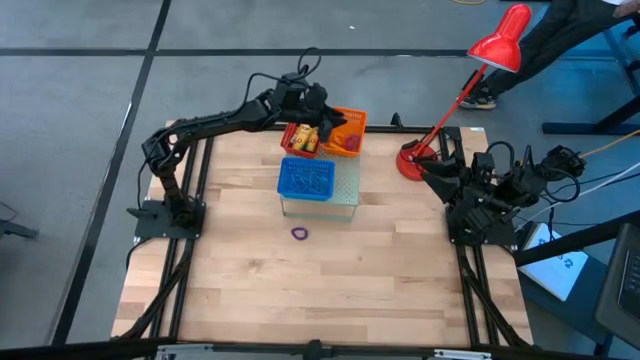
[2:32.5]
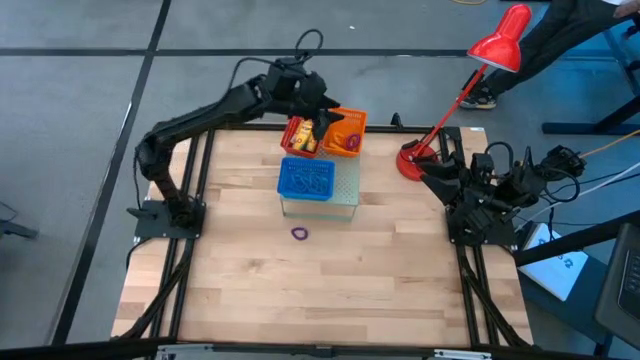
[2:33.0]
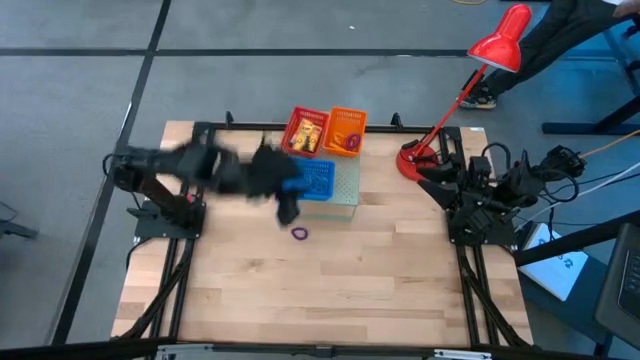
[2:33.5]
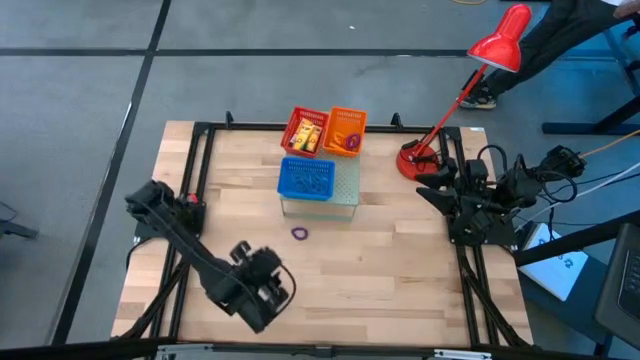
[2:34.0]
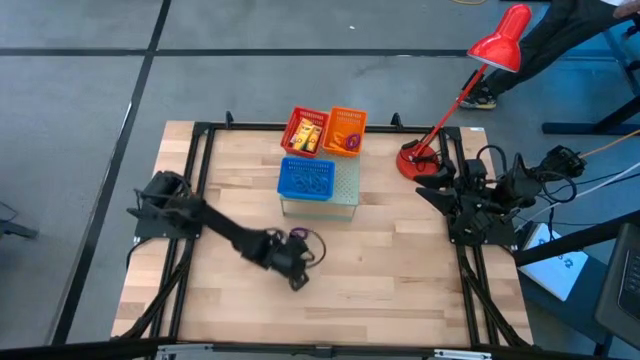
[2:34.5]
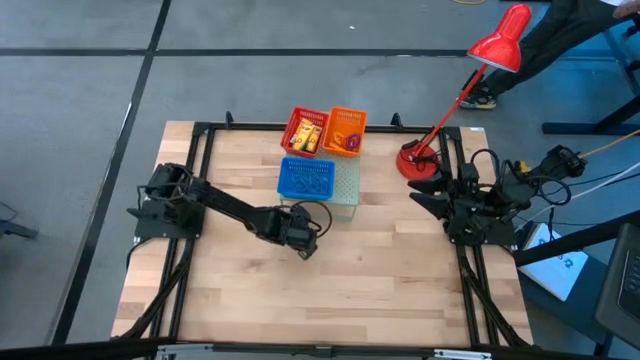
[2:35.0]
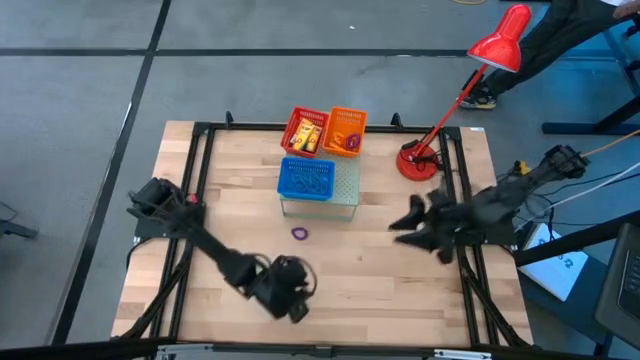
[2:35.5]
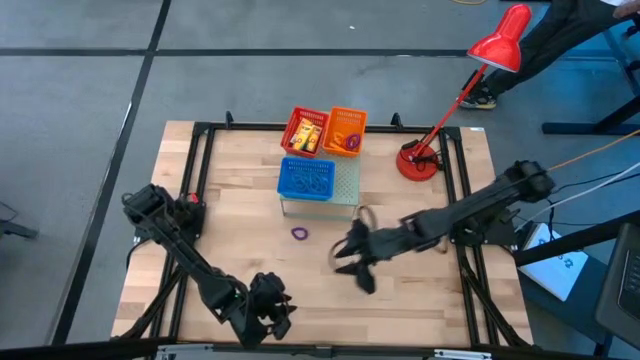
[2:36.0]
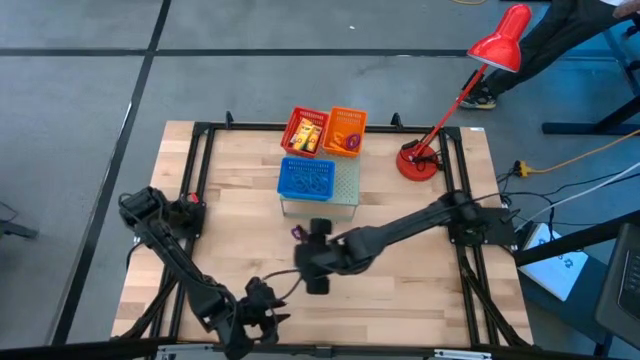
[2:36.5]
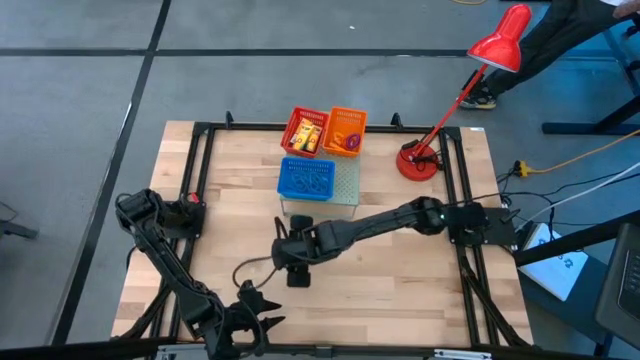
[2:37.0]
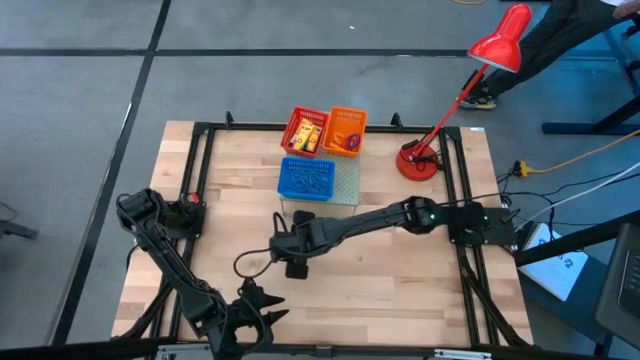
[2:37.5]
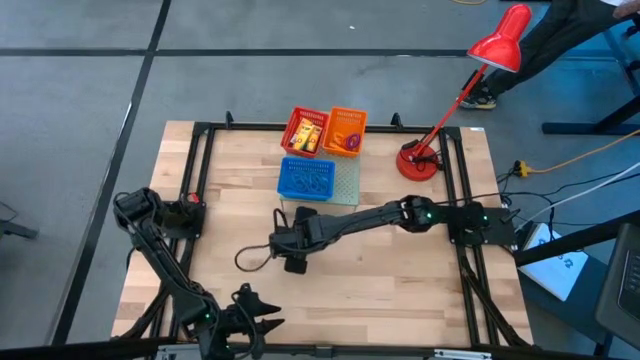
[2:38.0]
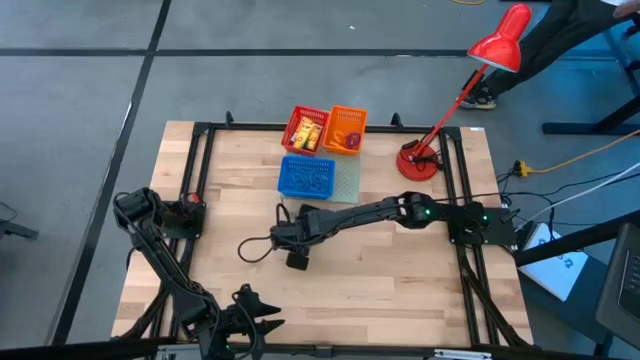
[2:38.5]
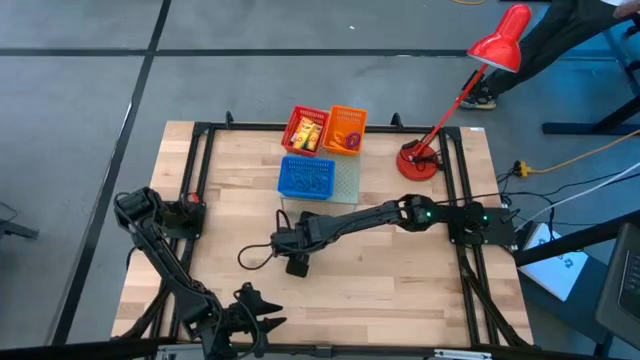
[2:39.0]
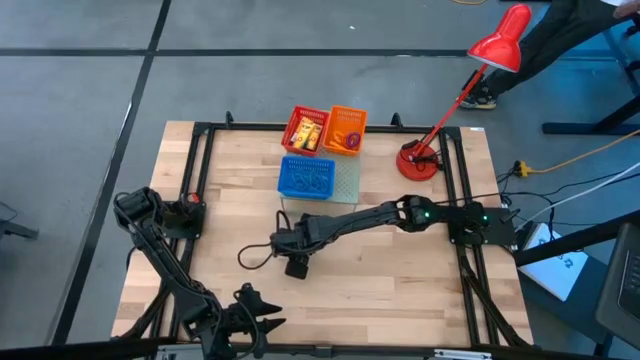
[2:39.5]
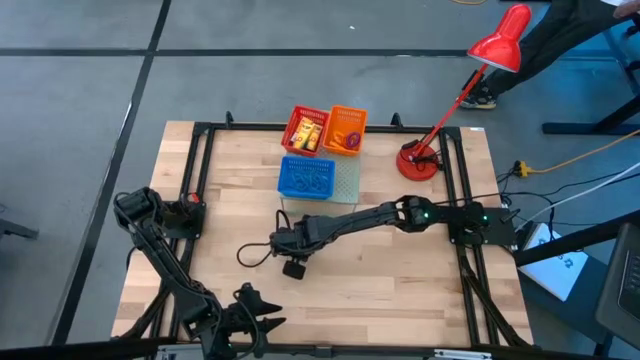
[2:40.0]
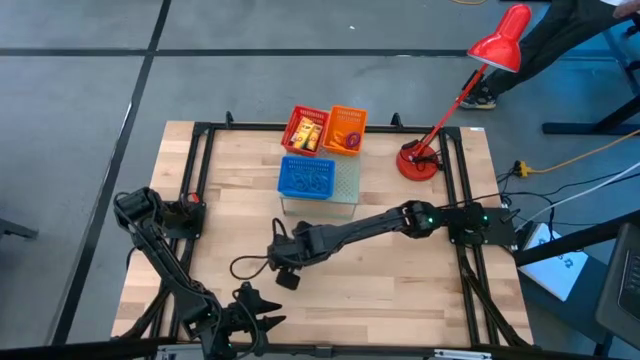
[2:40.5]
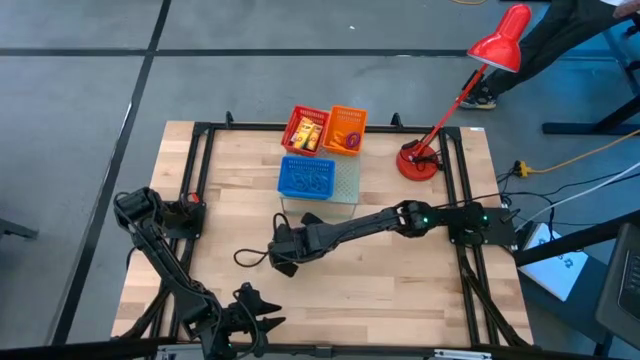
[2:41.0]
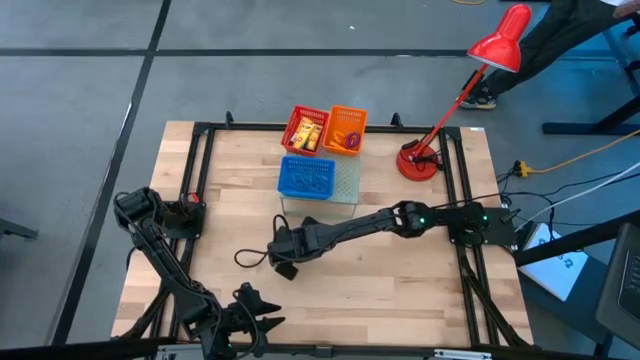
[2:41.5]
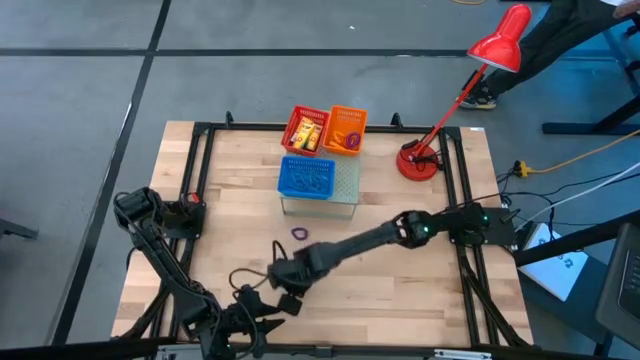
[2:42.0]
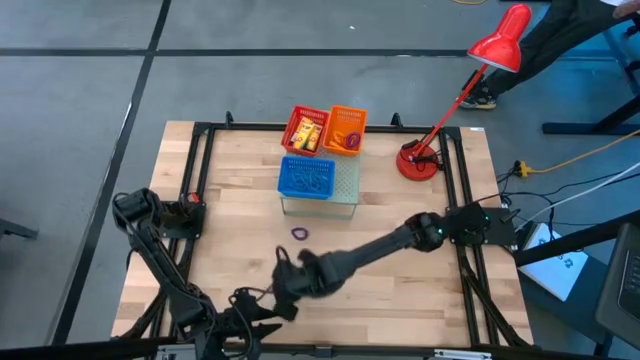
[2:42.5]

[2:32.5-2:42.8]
Task: Pick & Place Office Desk Supplies
Put the violet spring keychain into the orange basket on the shelf

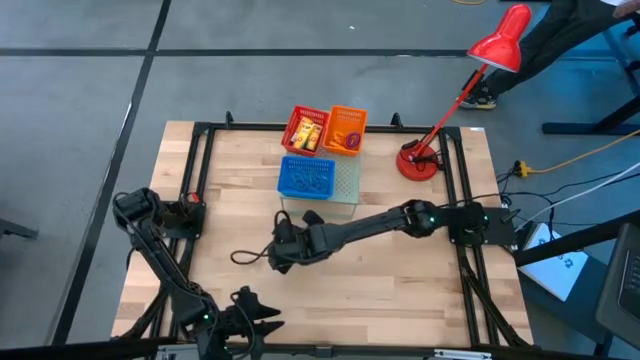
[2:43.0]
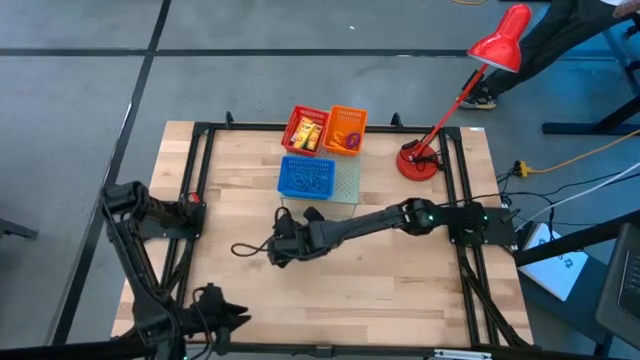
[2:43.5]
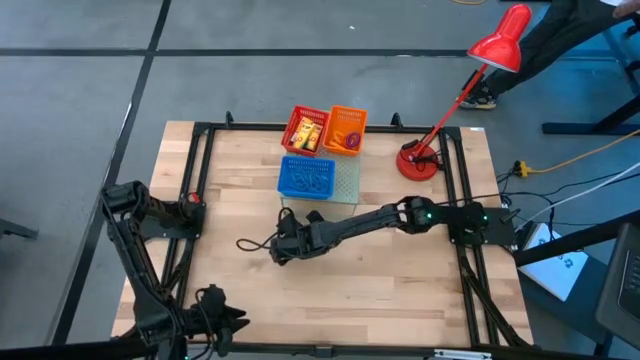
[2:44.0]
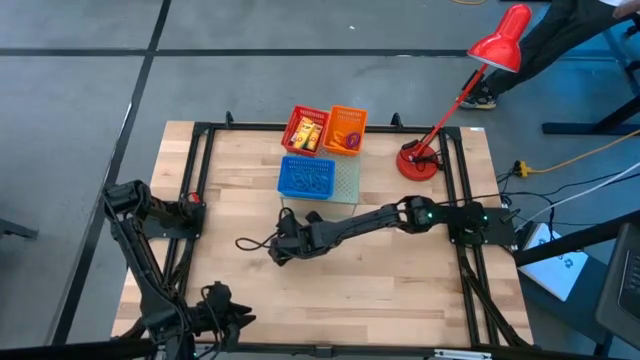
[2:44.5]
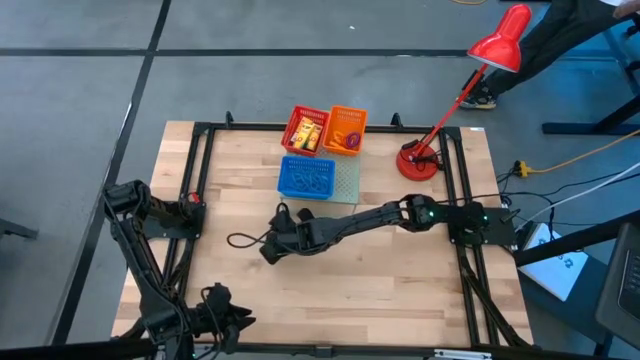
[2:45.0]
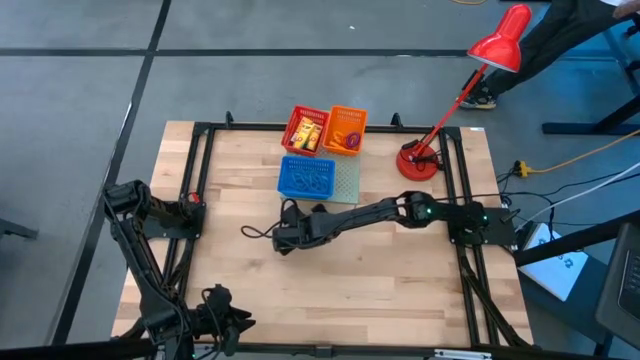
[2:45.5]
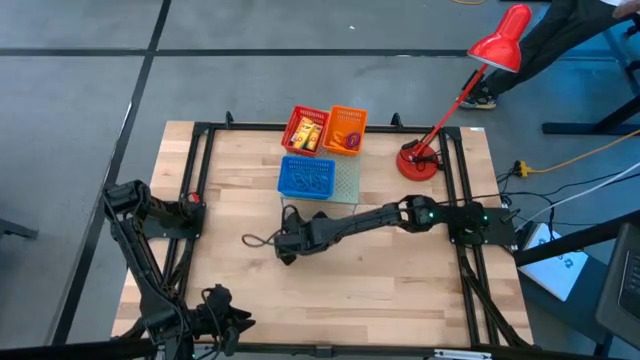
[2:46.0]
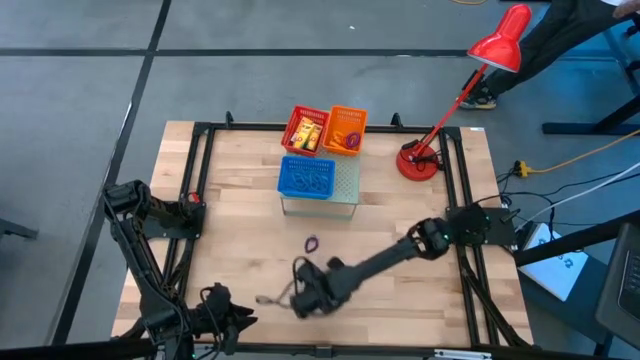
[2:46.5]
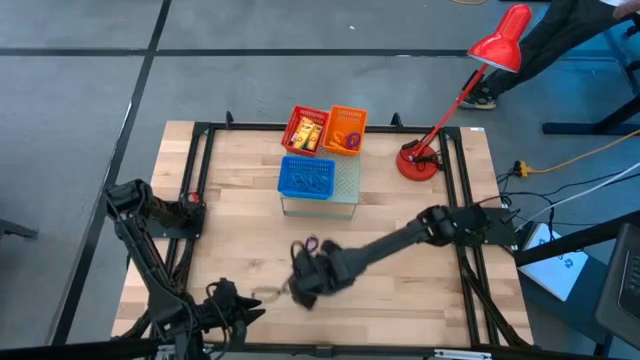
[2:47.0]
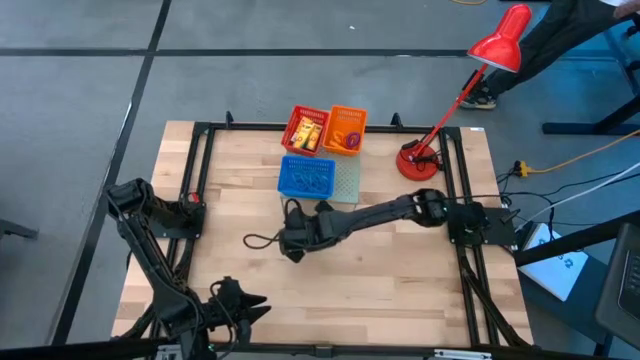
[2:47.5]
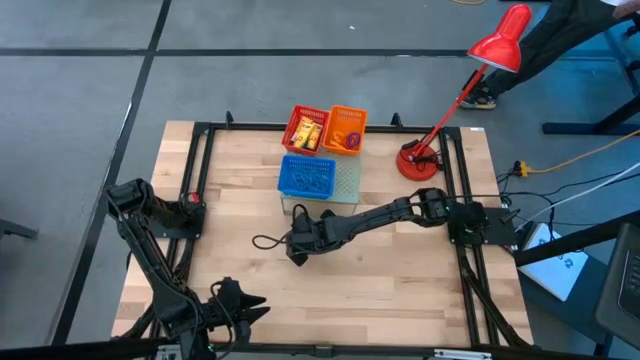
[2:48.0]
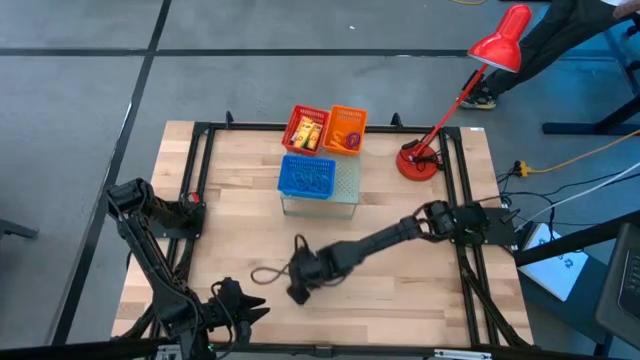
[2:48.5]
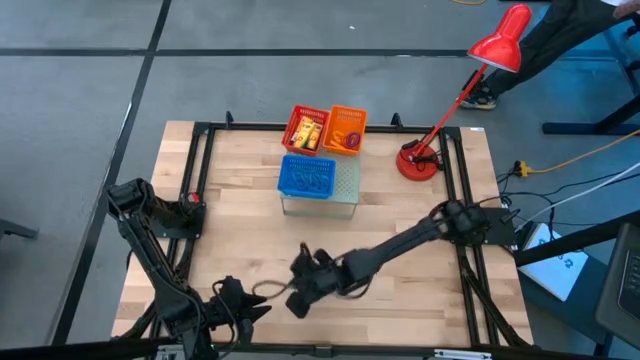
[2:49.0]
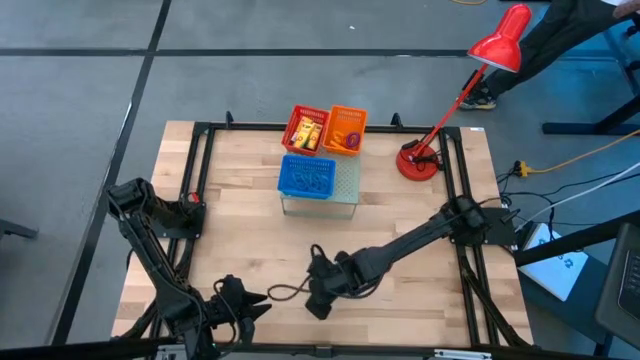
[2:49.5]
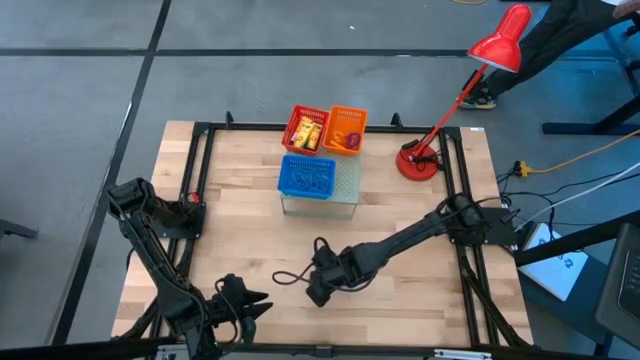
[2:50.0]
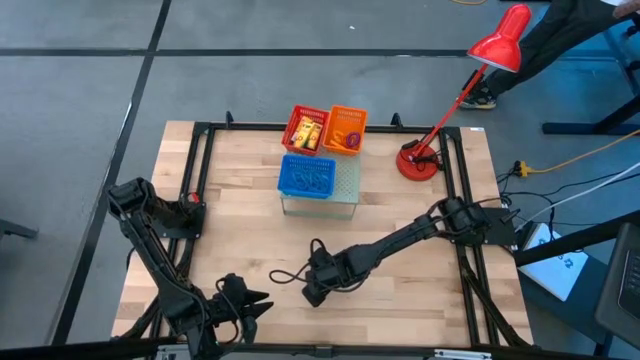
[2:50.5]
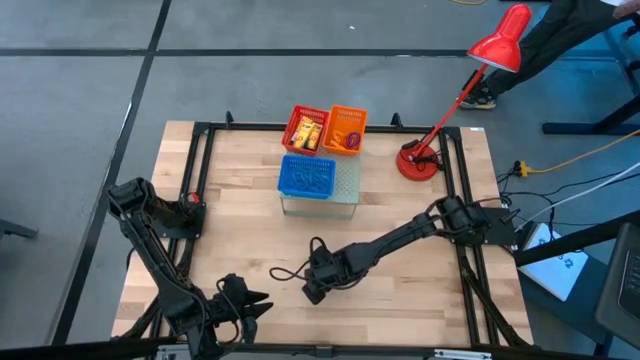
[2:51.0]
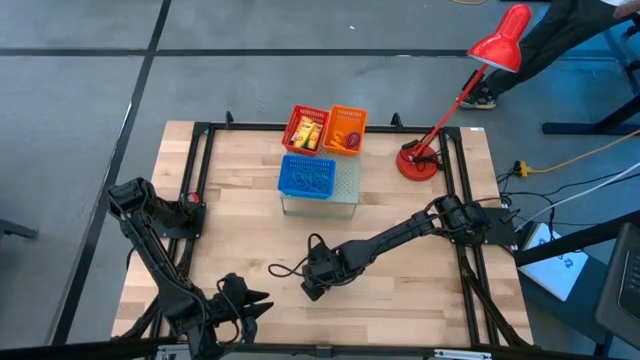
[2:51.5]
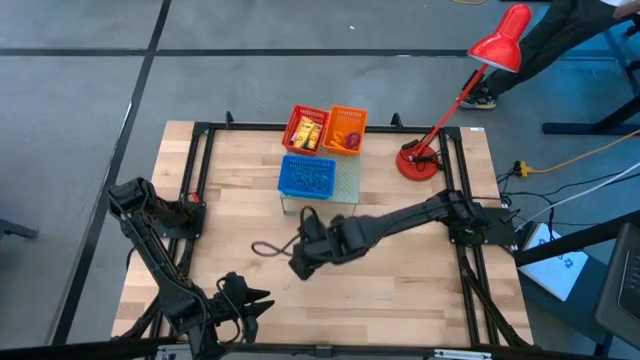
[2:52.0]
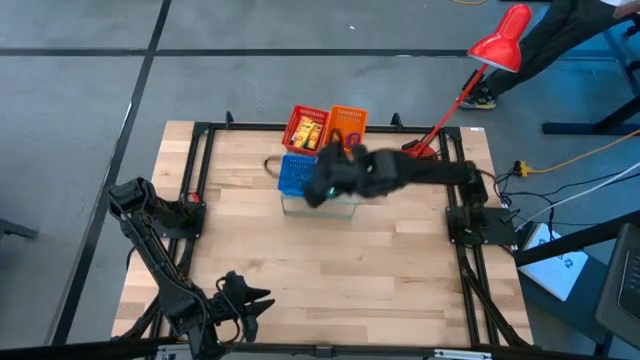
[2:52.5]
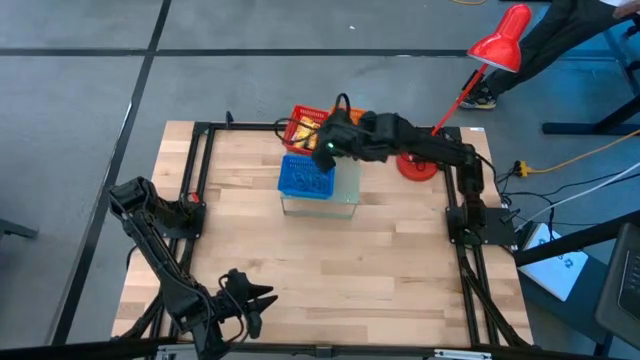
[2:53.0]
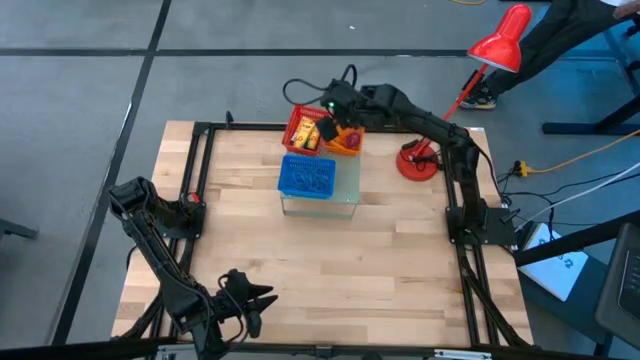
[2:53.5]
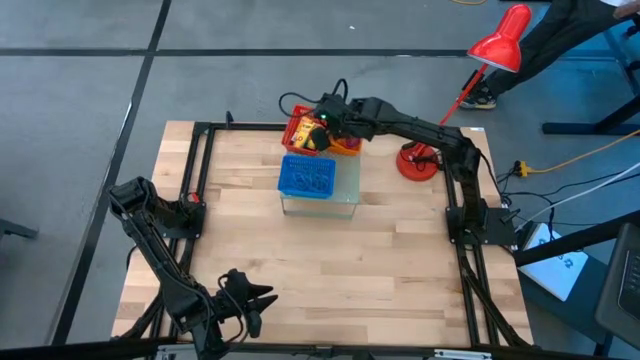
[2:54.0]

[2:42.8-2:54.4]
Put the violet spring keychain into the orange basket on the shelf
